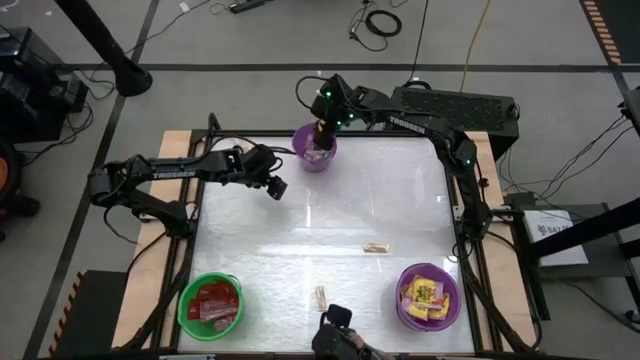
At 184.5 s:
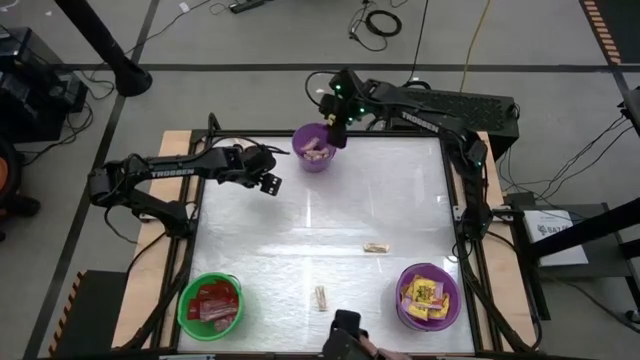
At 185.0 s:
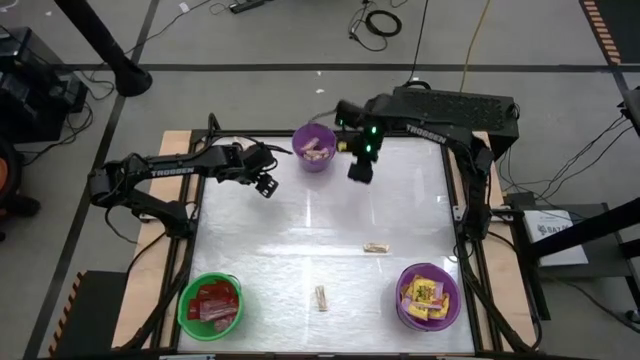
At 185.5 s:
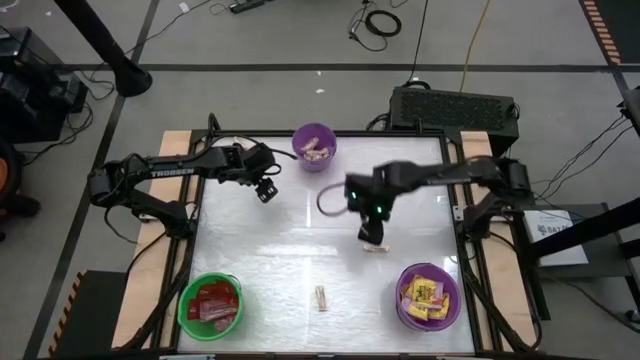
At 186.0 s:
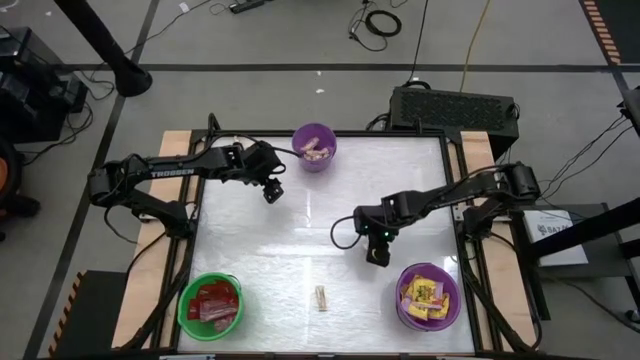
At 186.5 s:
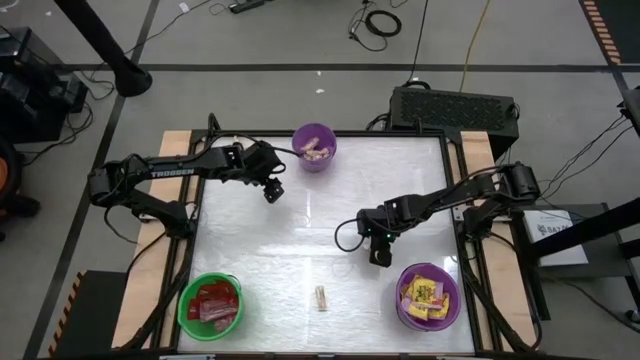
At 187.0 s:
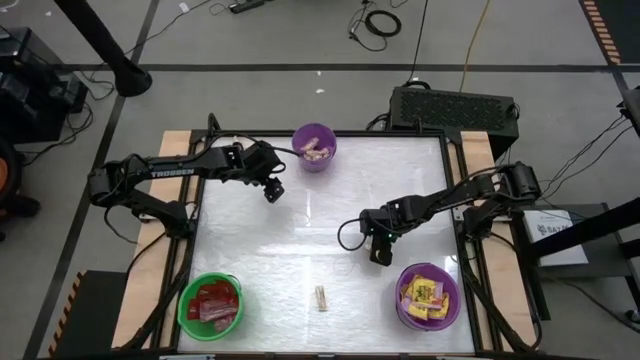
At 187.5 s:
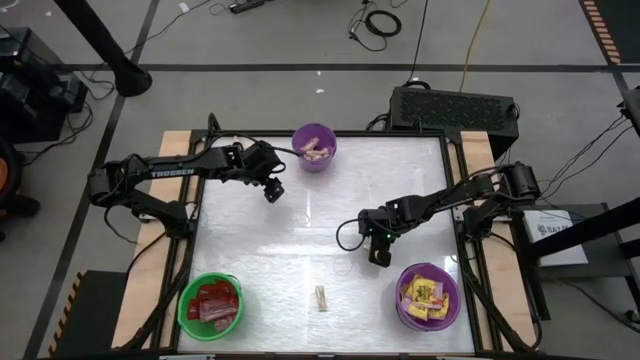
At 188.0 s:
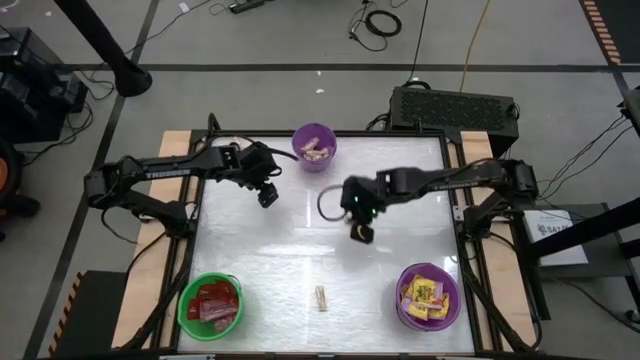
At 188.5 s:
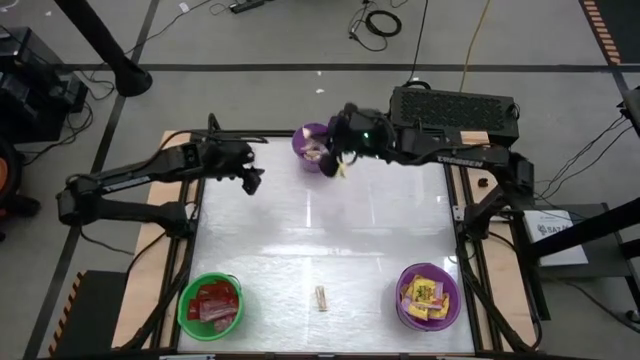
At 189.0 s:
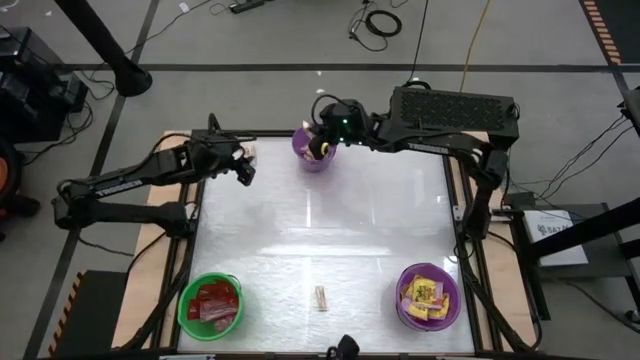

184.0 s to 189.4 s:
Task: Sort candy by brand, put in halloween buckets
Put the white chocolate into the top purple bucket

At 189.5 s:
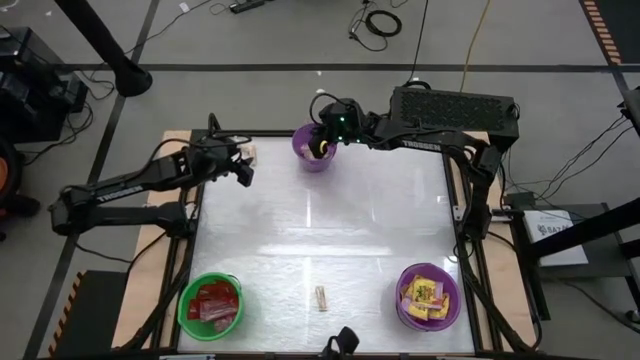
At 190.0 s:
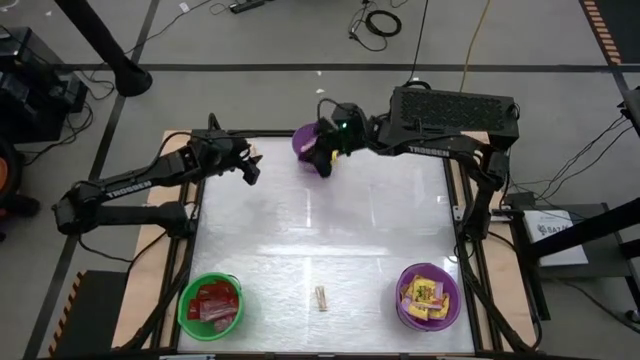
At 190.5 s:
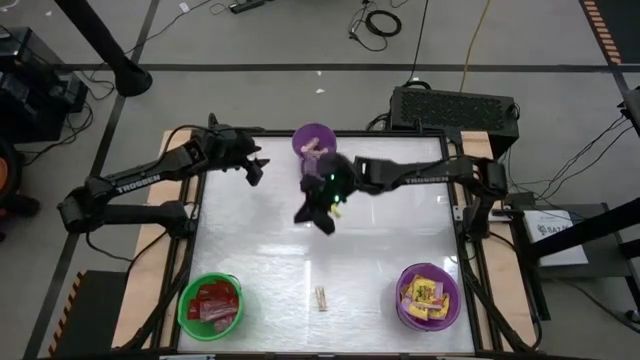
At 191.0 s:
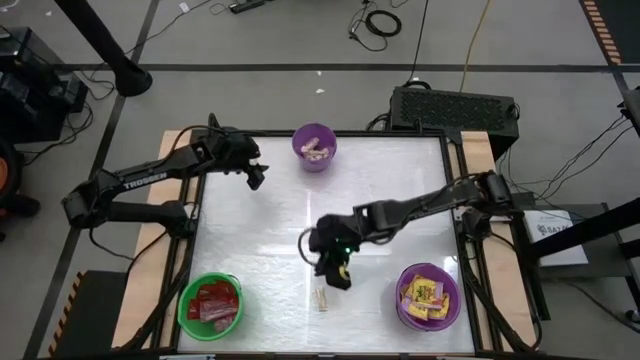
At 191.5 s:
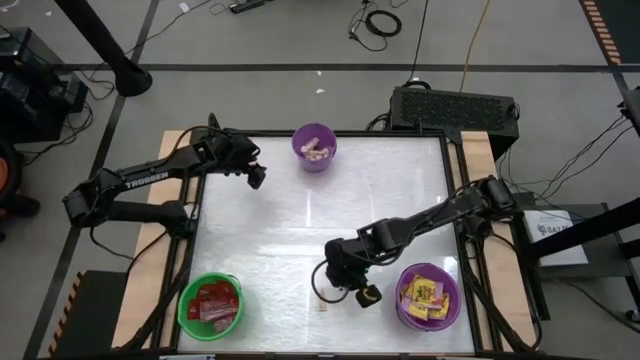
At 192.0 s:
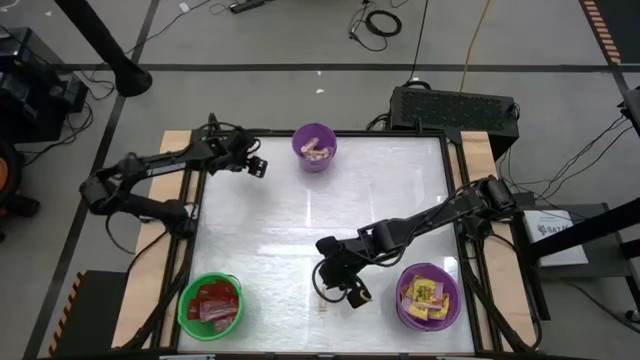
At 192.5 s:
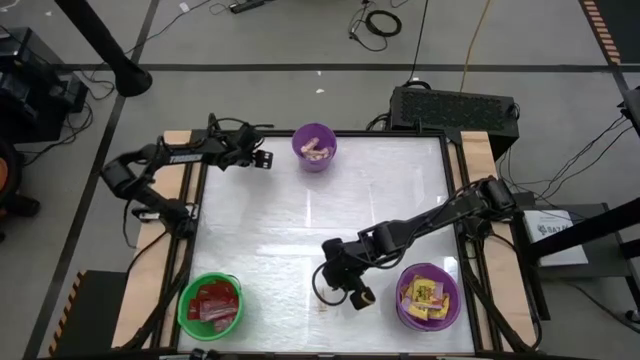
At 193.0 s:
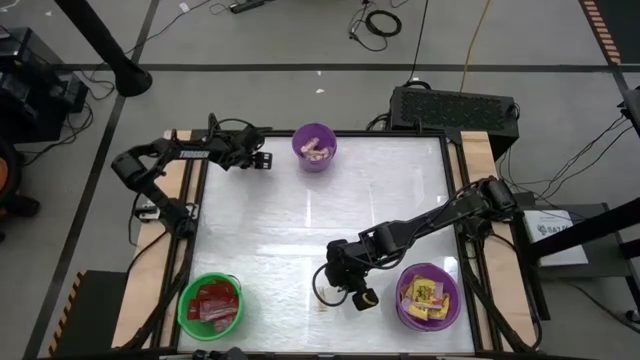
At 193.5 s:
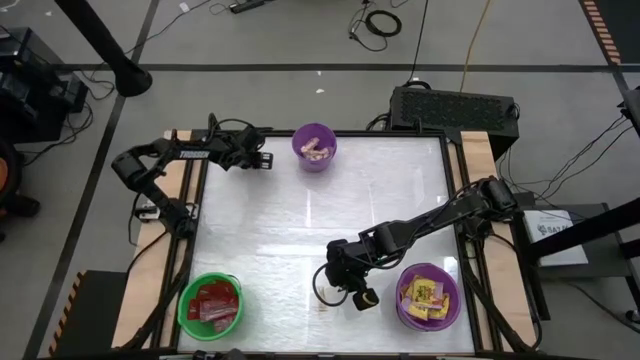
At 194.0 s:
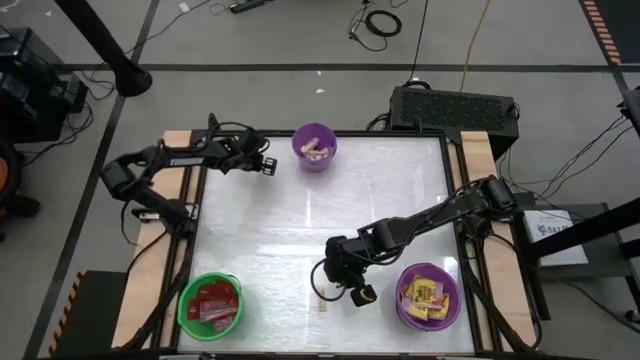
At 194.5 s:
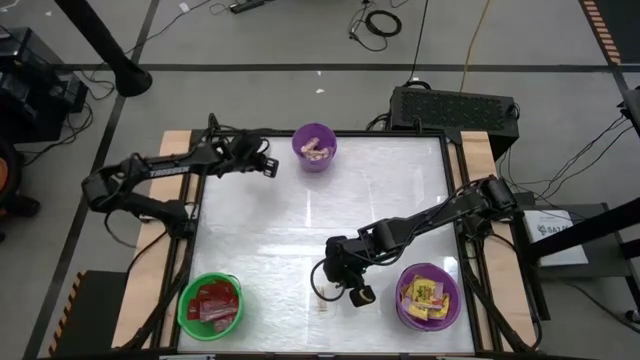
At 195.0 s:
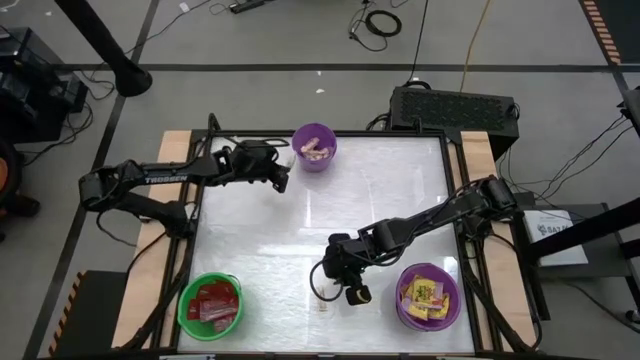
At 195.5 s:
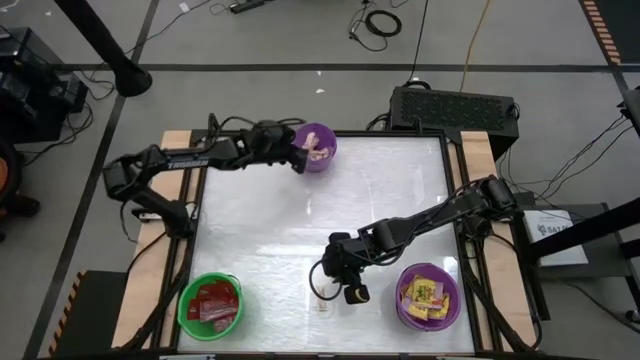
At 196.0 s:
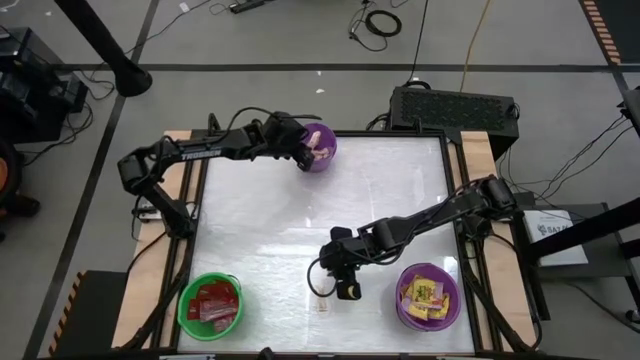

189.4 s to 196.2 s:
Put the white chocolate into the top purple bucket

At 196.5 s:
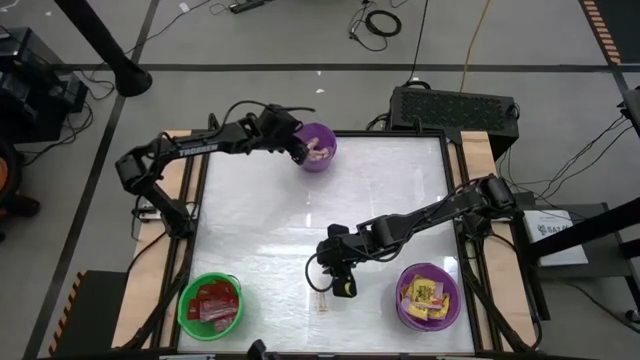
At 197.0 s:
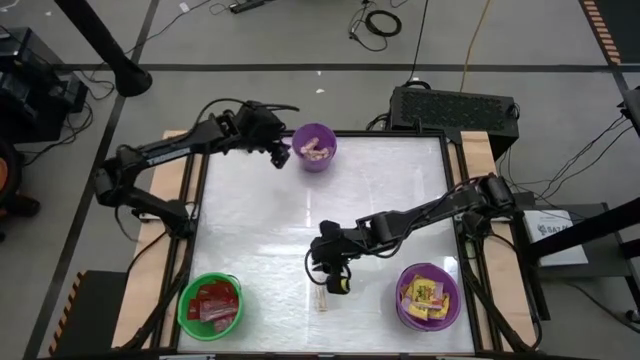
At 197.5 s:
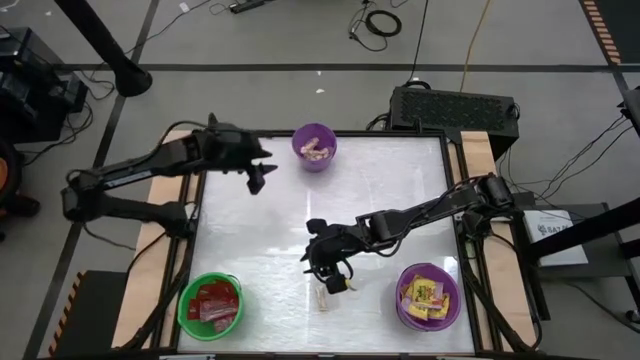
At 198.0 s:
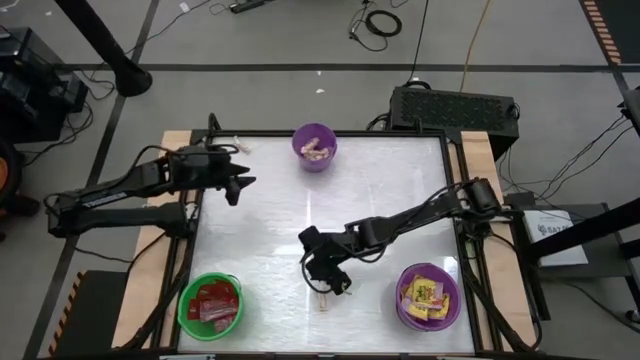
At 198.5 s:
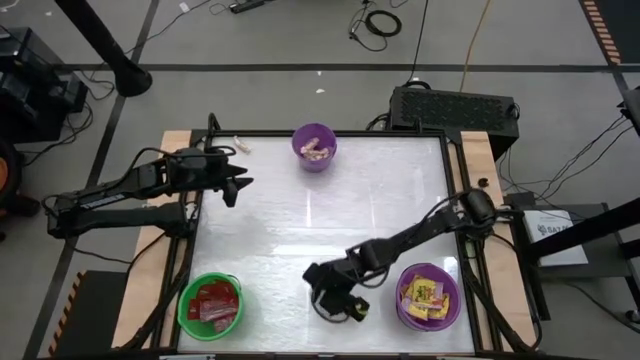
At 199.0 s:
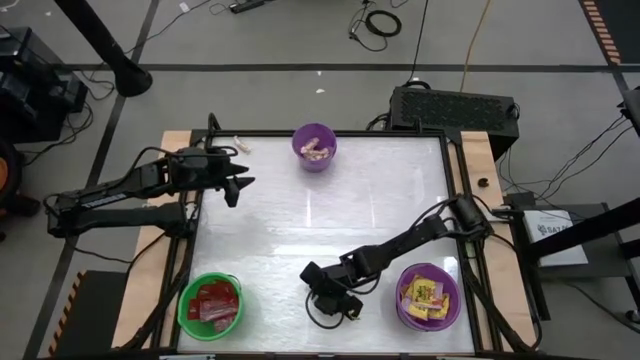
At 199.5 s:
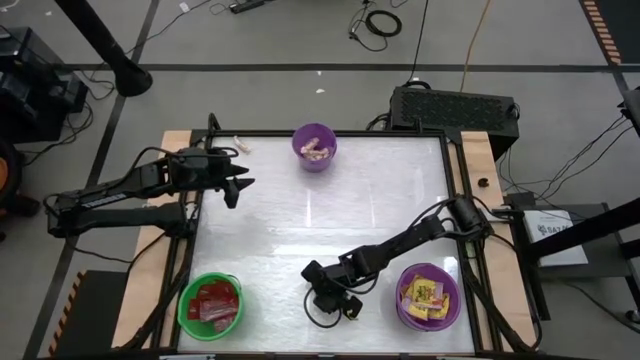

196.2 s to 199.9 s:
Put the white chocolate into the top purple bucket

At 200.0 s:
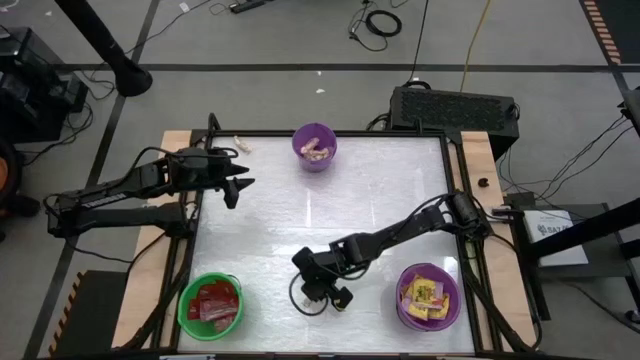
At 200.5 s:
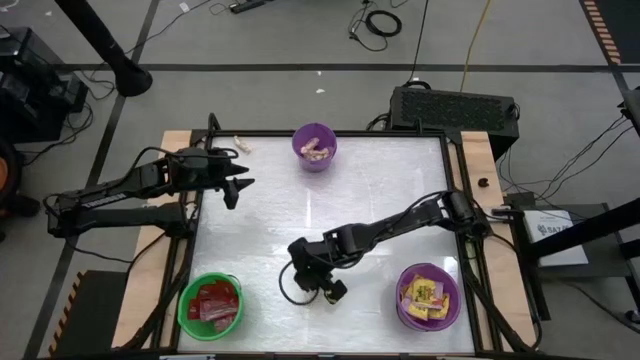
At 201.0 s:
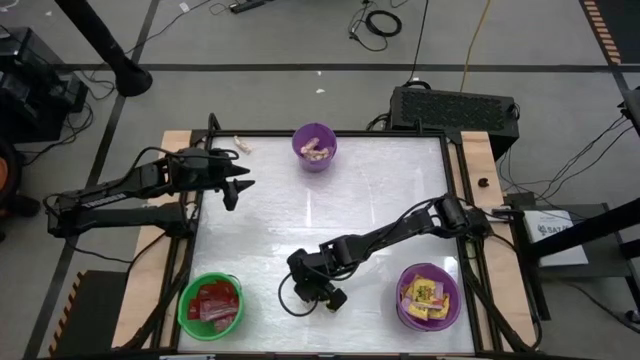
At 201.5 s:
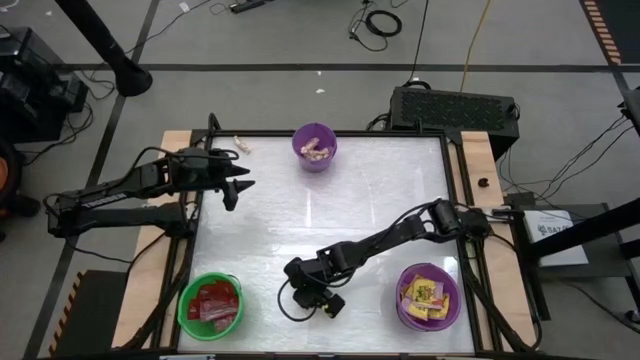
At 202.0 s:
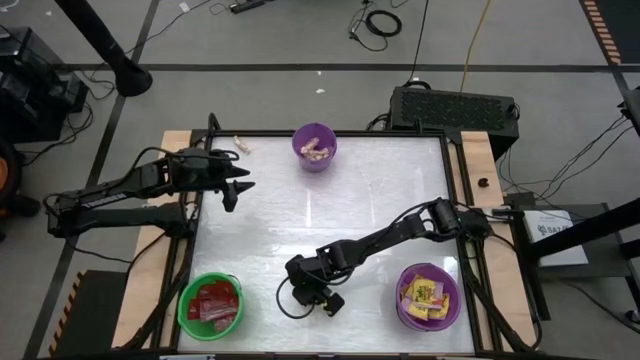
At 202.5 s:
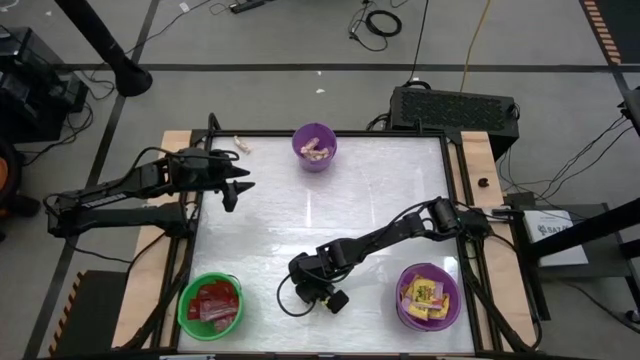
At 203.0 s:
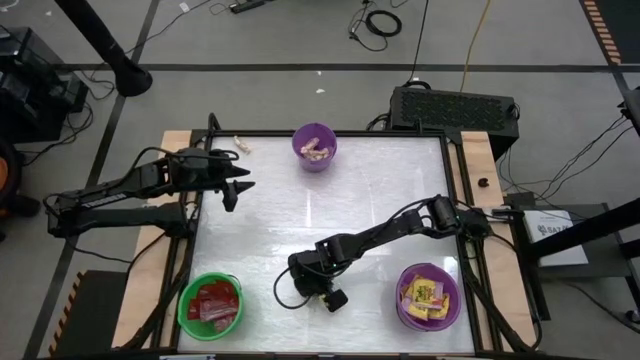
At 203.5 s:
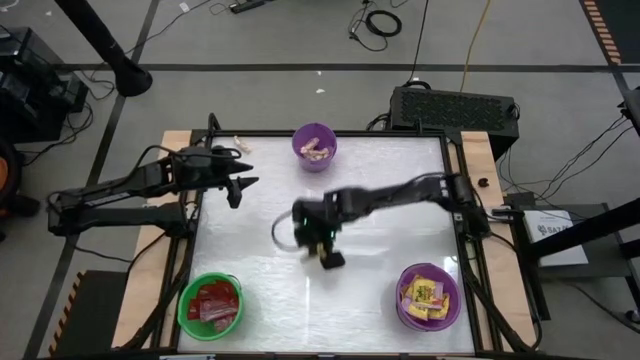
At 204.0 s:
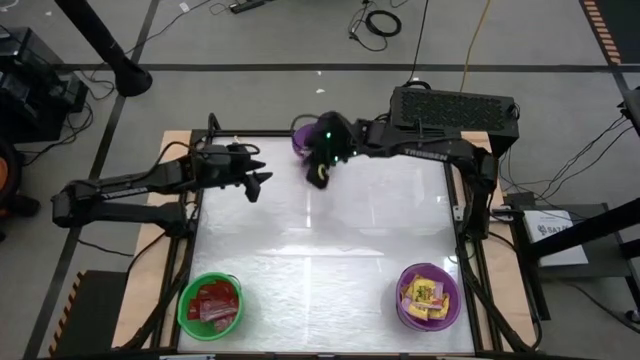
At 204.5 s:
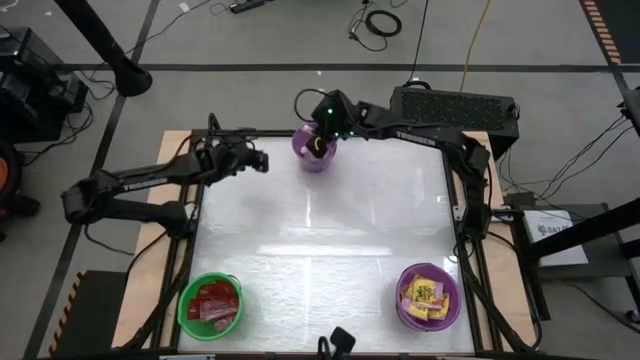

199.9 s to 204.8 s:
Put the white chocolate into the top purple bucket
